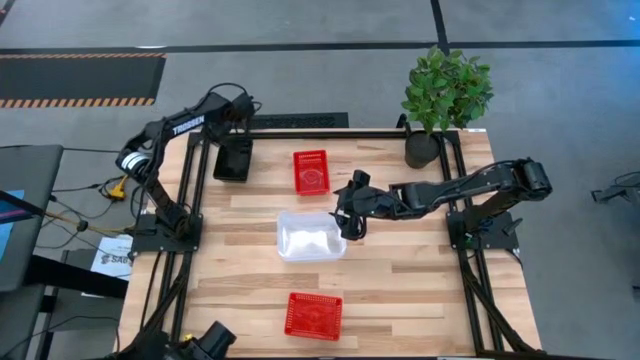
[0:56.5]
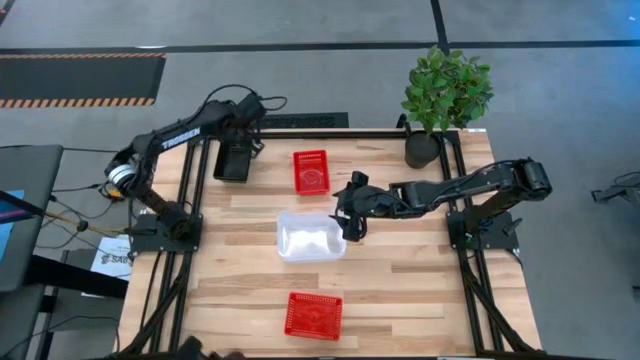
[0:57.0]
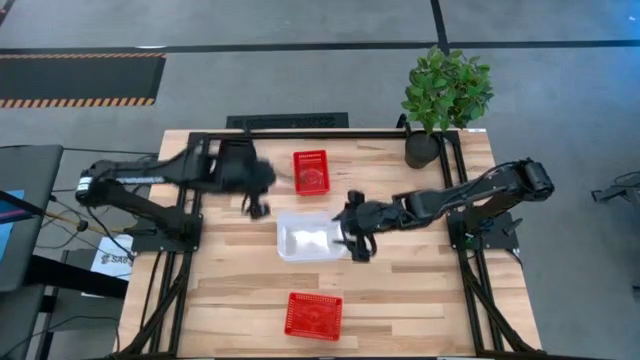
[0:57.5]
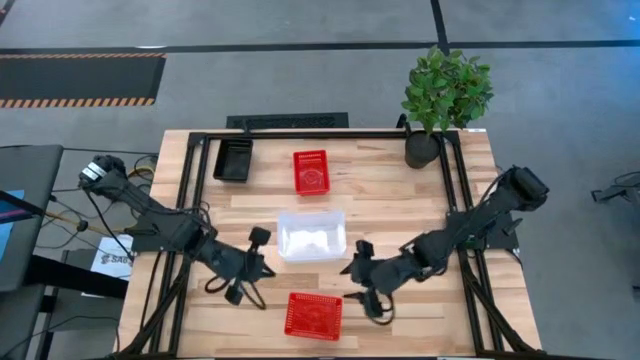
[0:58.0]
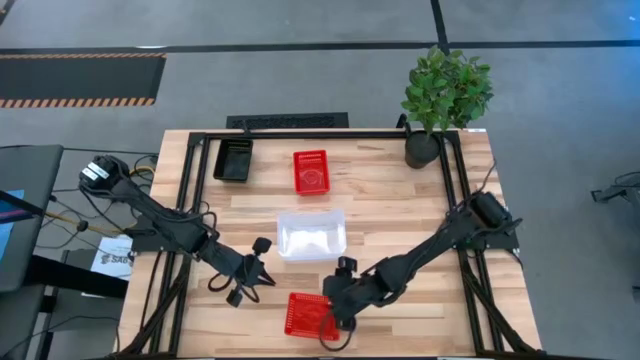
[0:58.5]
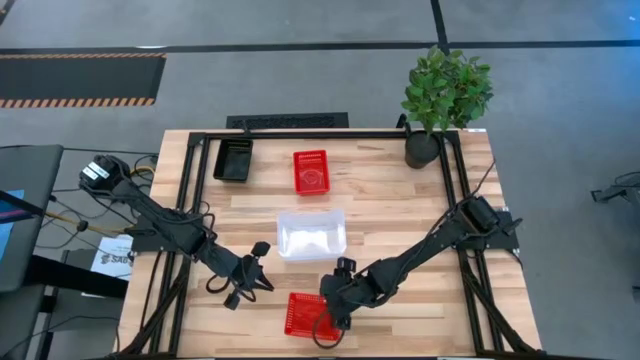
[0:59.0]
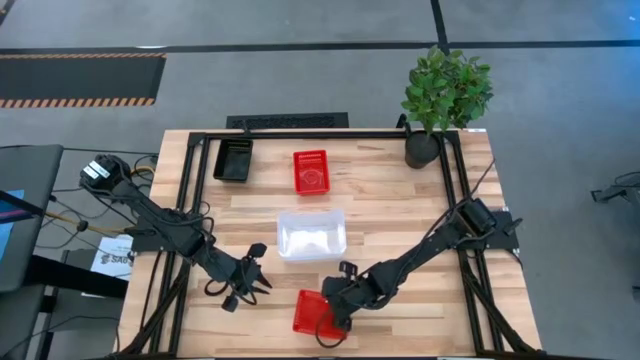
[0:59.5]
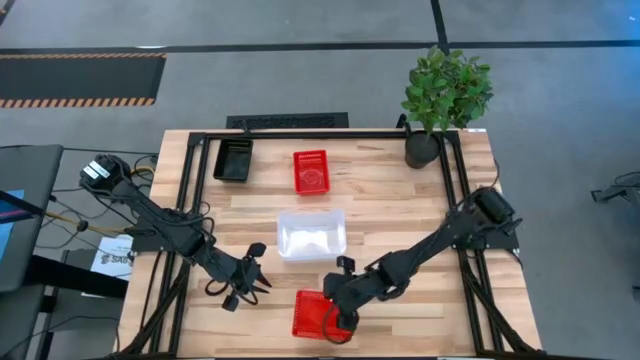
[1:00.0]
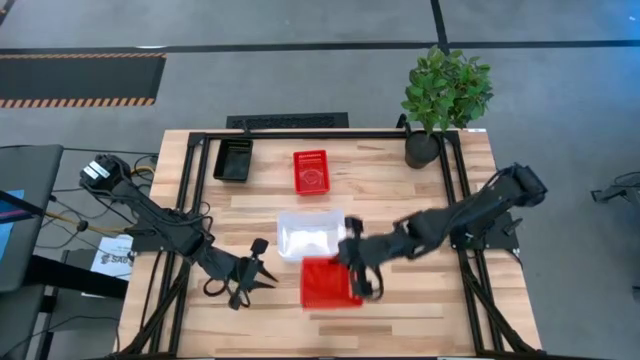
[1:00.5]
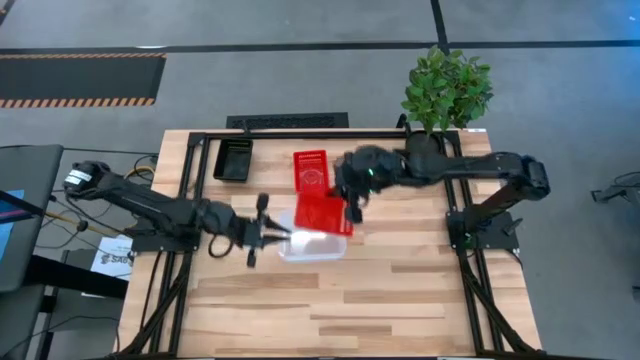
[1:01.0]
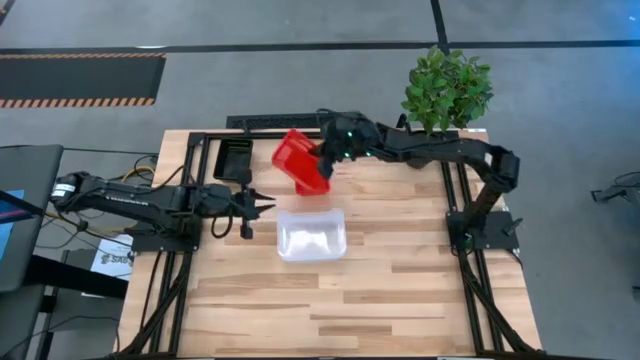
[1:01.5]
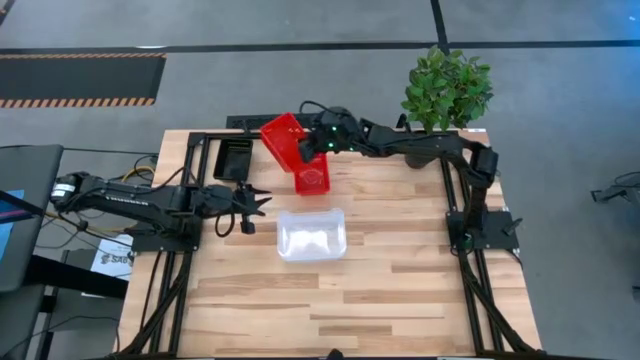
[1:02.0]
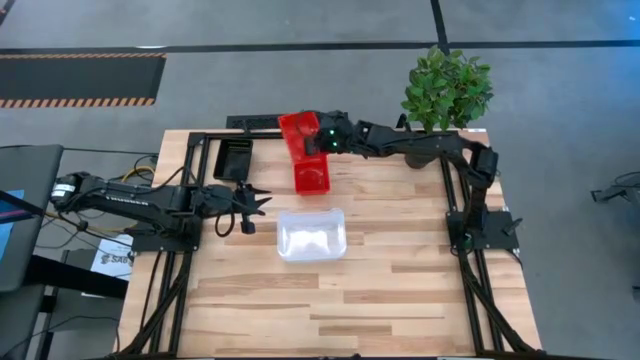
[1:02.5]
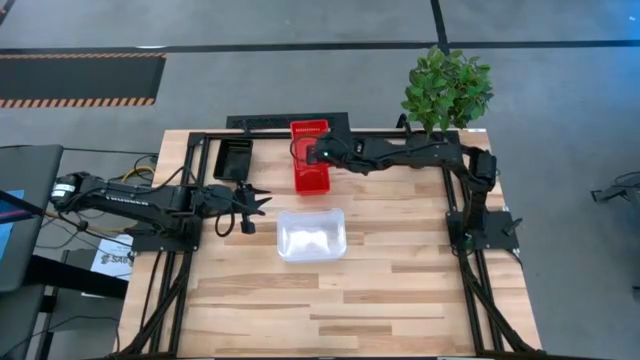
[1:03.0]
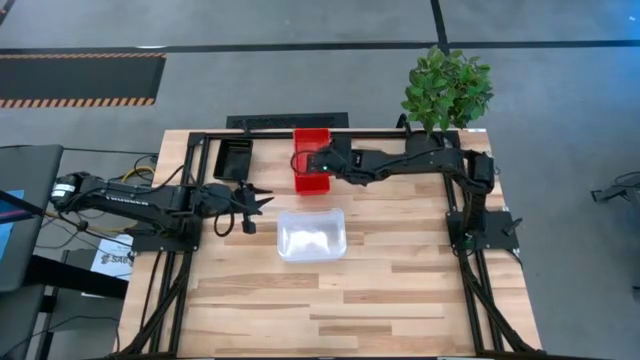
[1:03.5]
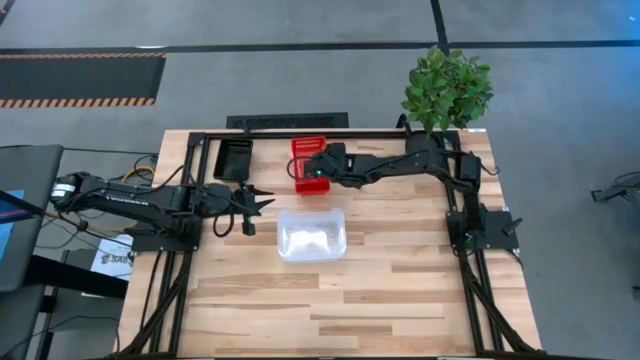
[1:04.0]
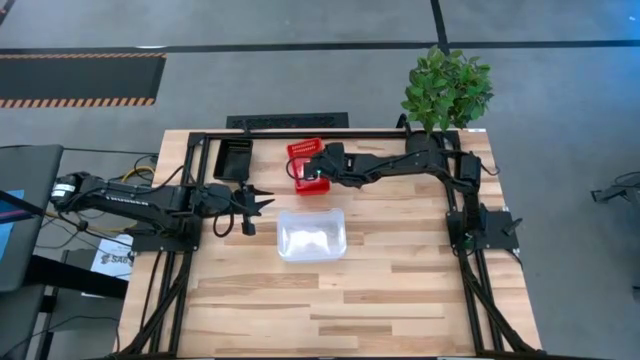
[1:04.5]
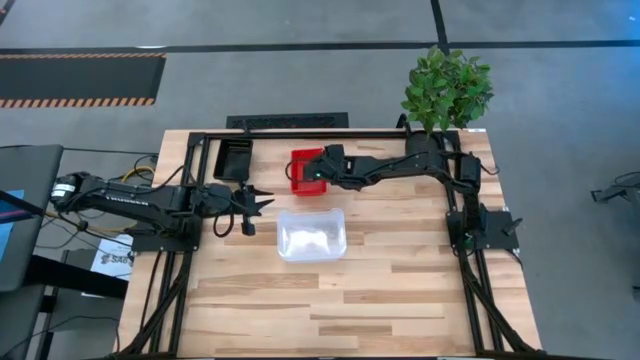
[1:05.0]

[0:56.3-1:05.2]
Stack the bottom red bin on top of the top red bins

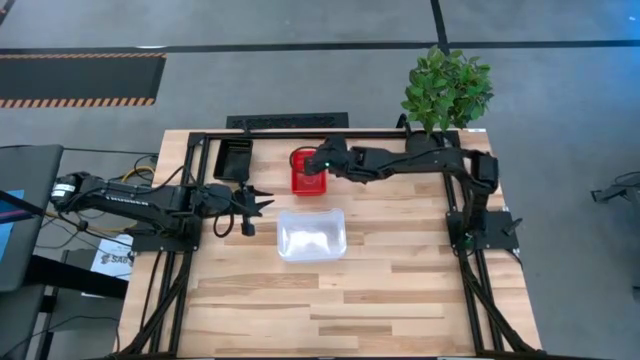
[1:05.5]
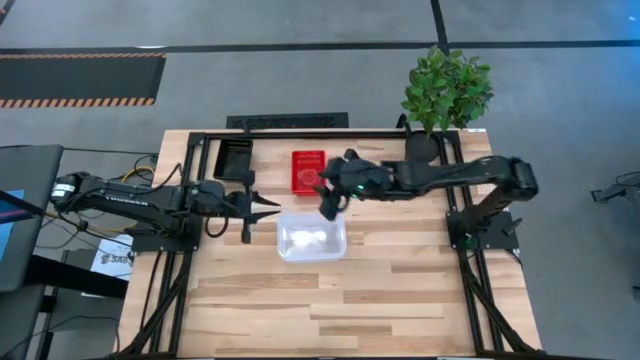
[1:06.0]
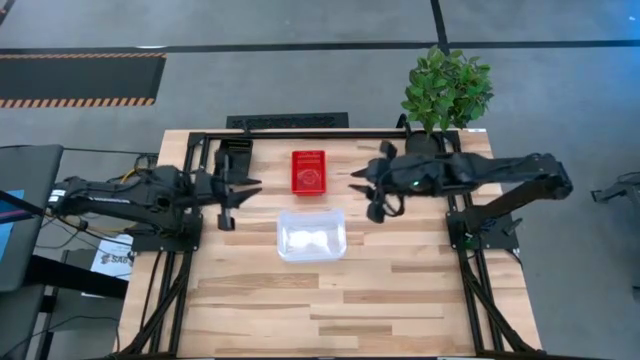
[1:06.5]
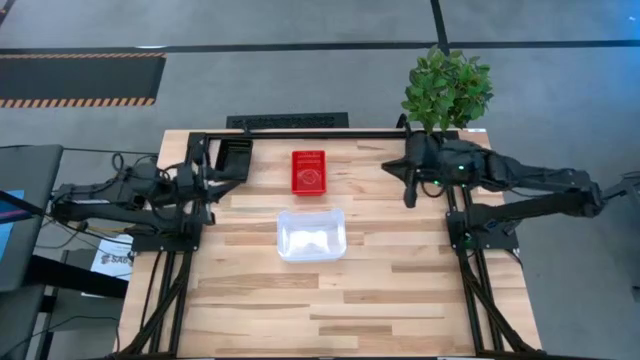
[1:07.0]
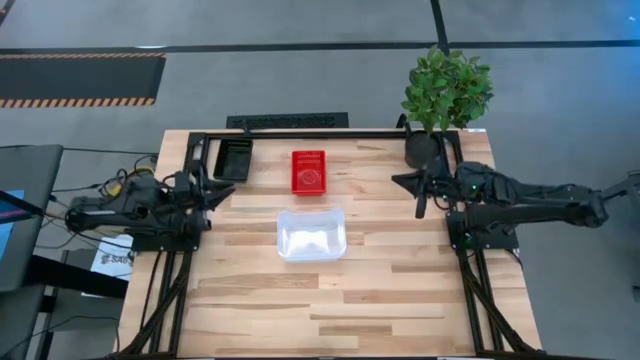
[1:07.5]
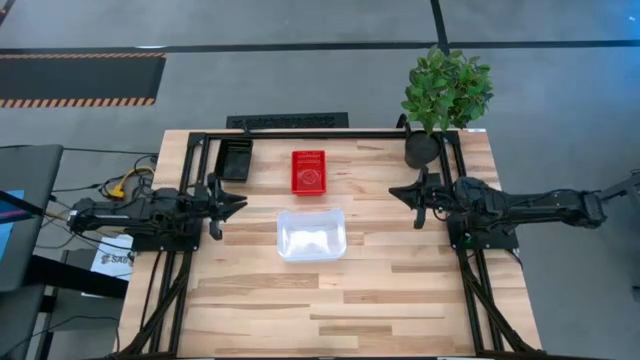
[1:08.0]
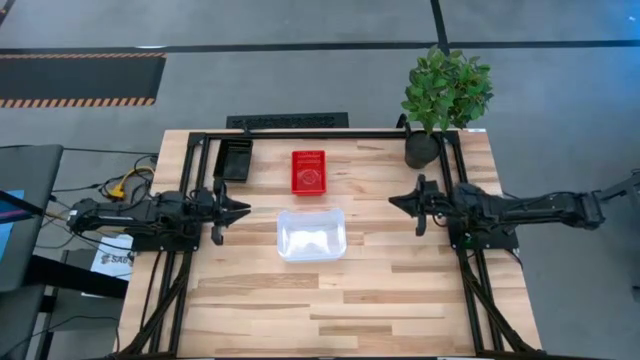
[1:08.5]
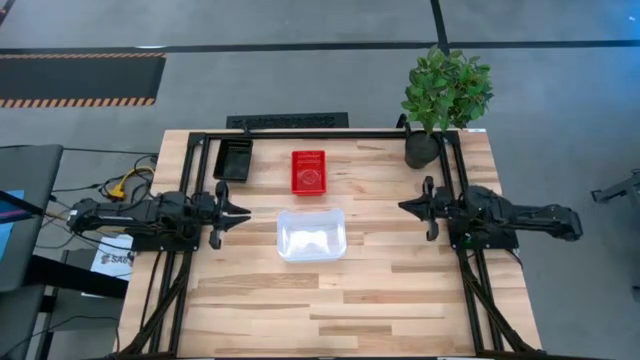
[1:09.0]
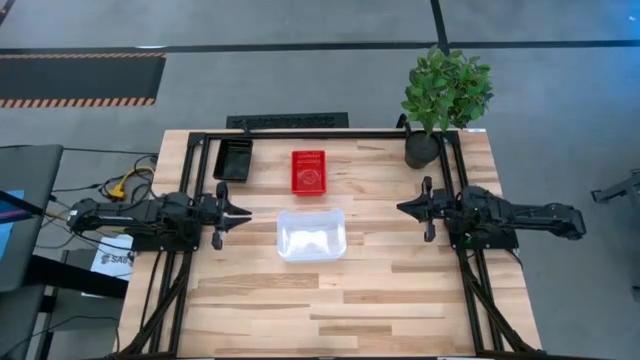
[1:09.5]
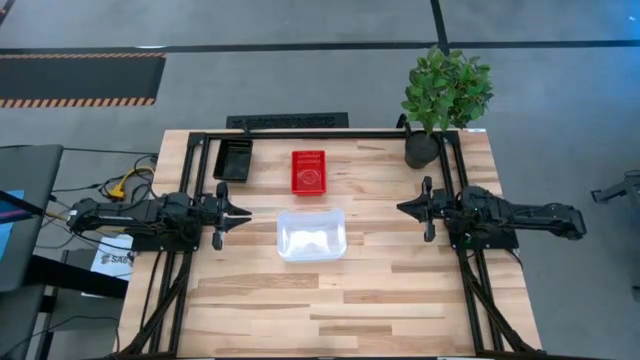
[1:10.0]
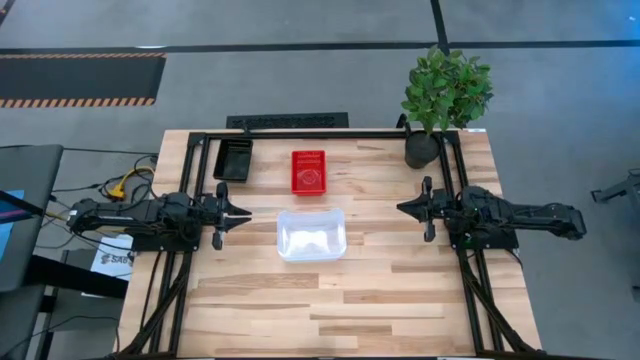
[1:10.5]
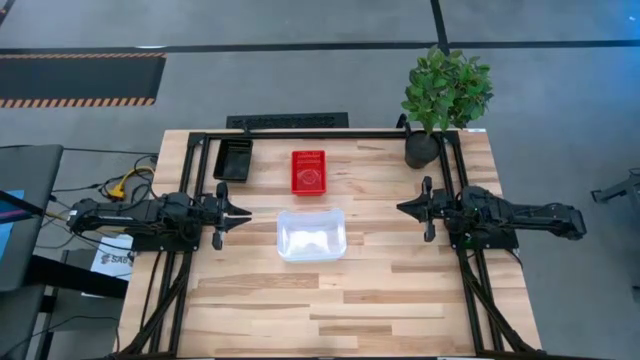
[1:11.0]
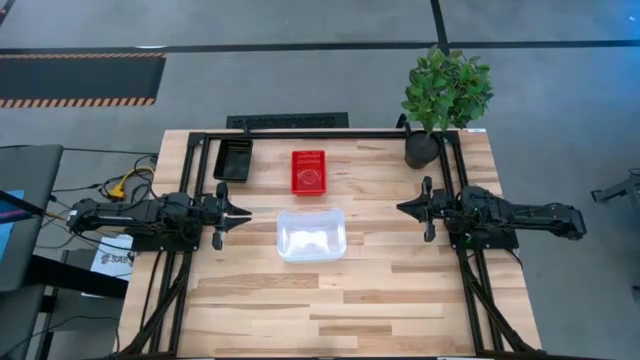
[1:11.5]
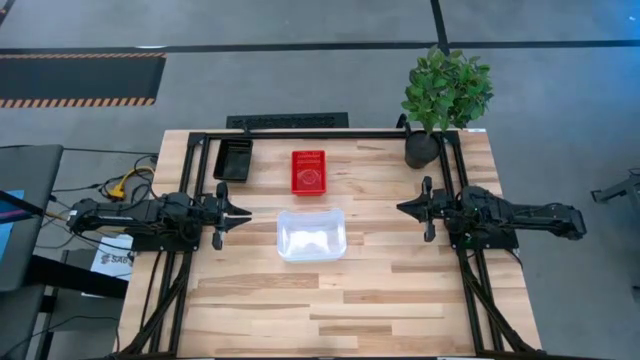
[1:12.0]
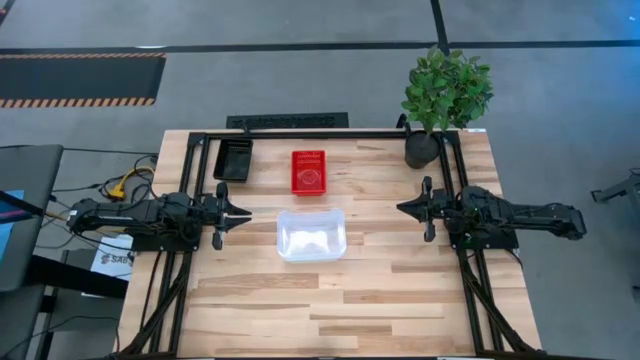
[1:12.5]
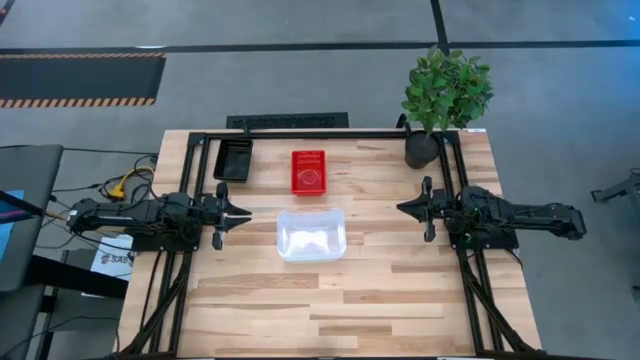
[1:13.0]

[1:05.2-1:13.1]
Return to Home Position
